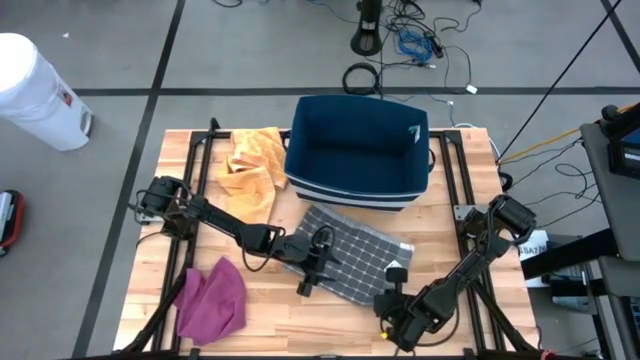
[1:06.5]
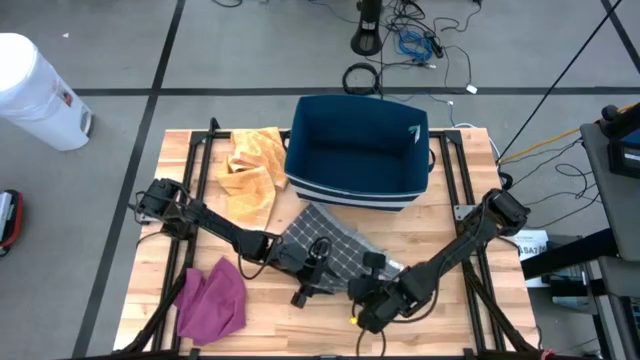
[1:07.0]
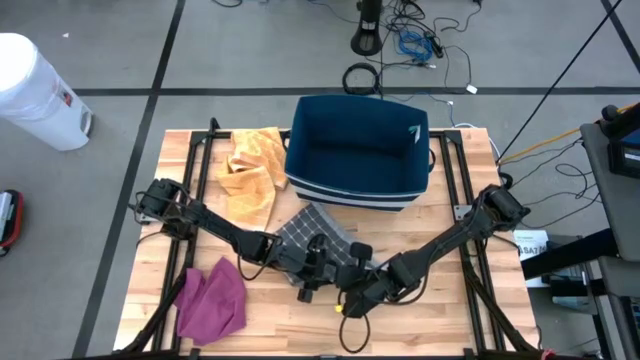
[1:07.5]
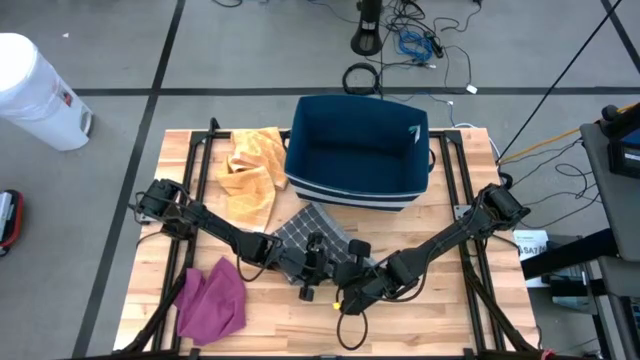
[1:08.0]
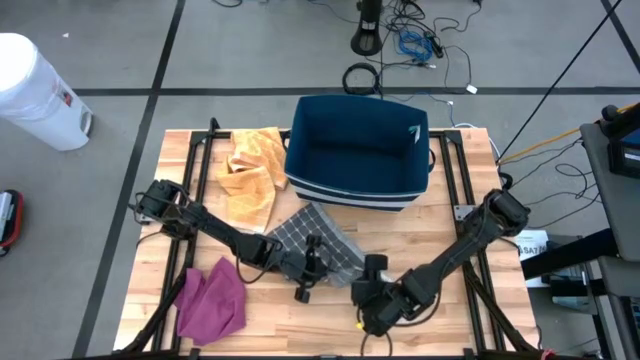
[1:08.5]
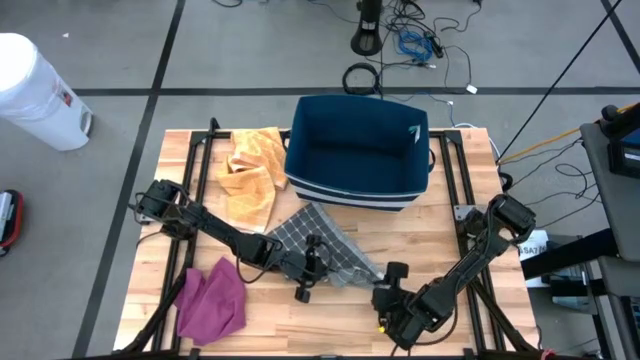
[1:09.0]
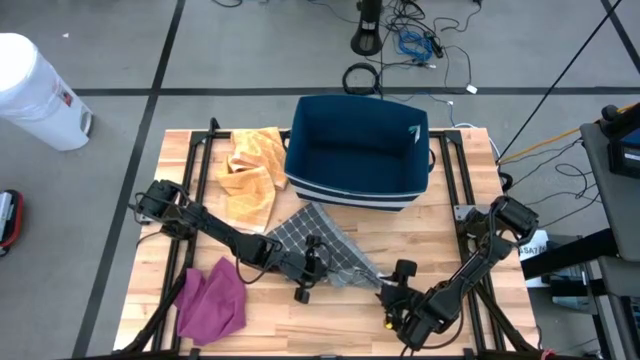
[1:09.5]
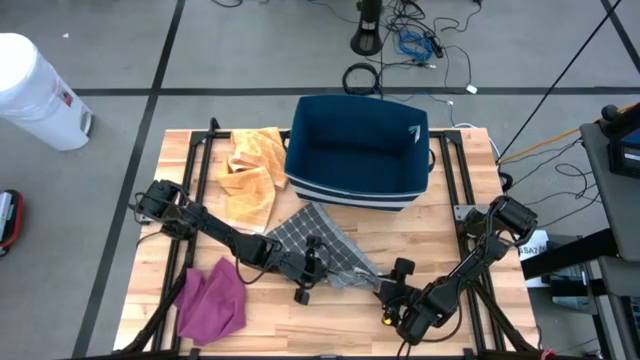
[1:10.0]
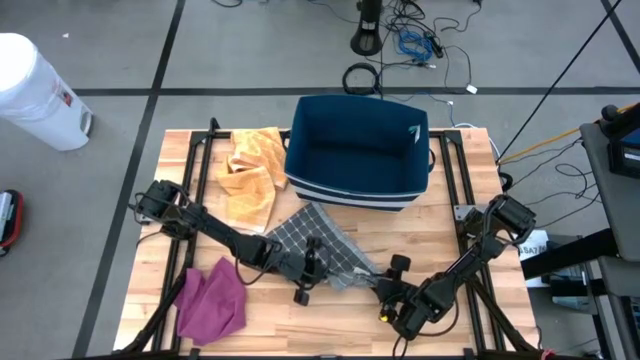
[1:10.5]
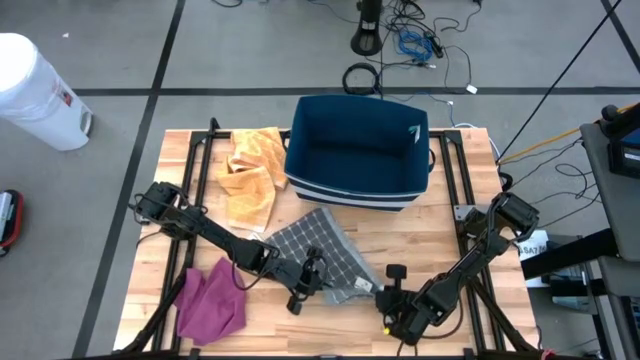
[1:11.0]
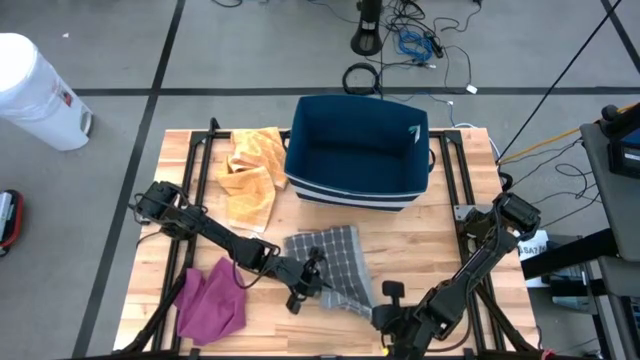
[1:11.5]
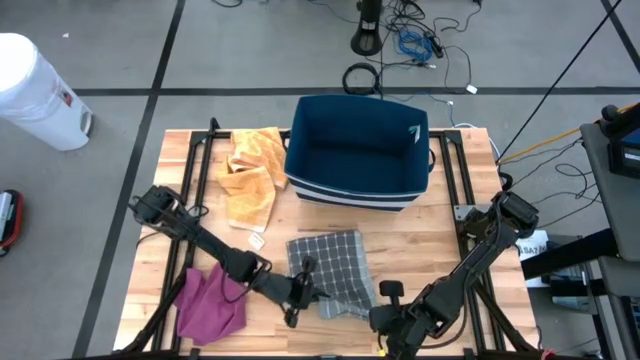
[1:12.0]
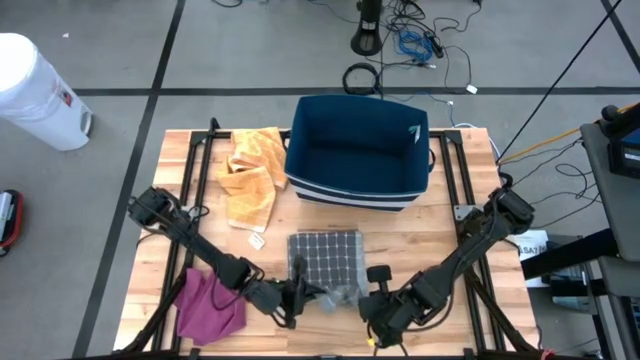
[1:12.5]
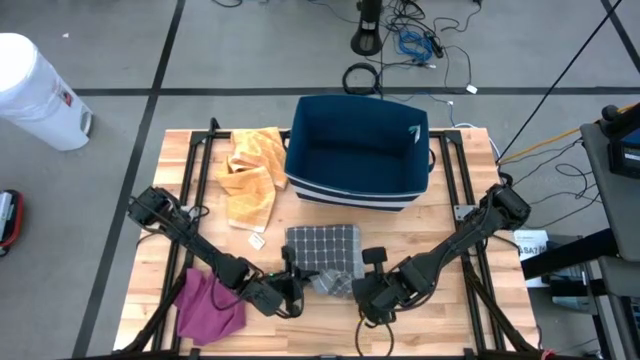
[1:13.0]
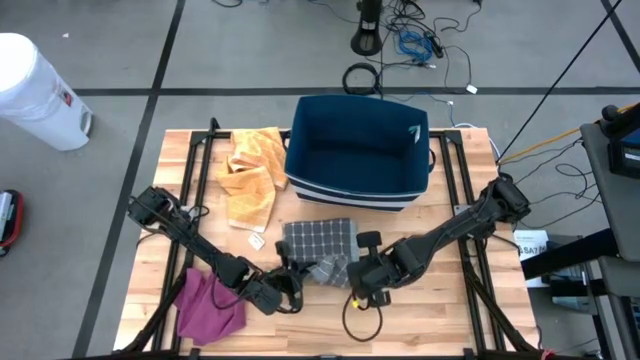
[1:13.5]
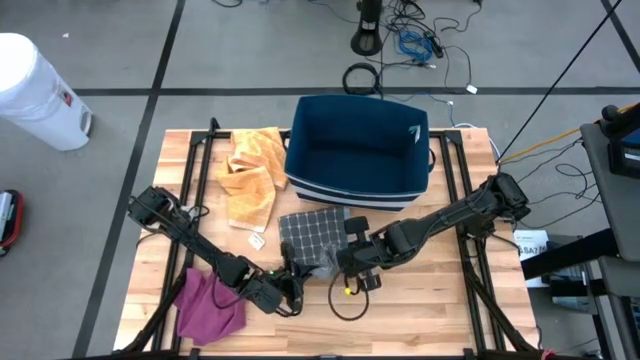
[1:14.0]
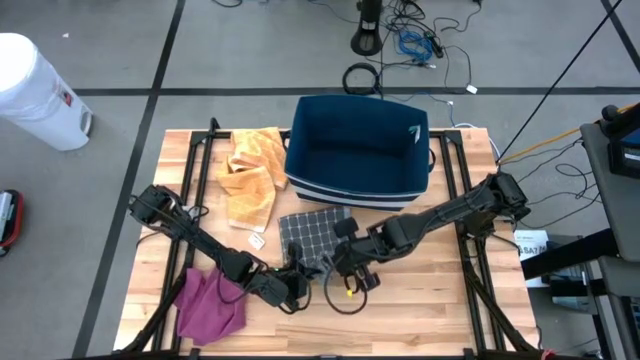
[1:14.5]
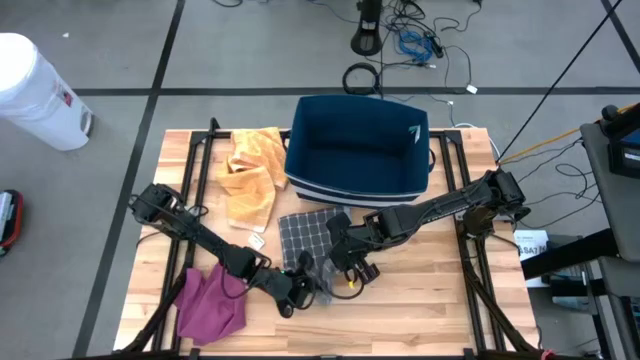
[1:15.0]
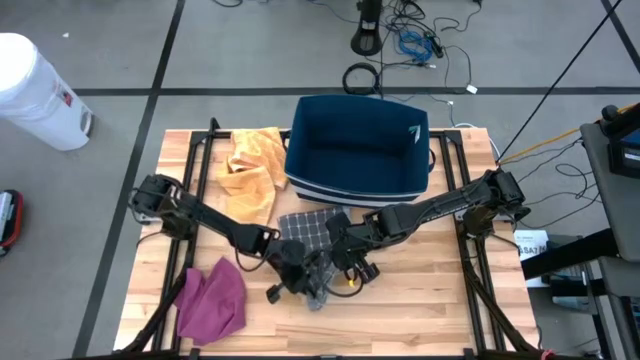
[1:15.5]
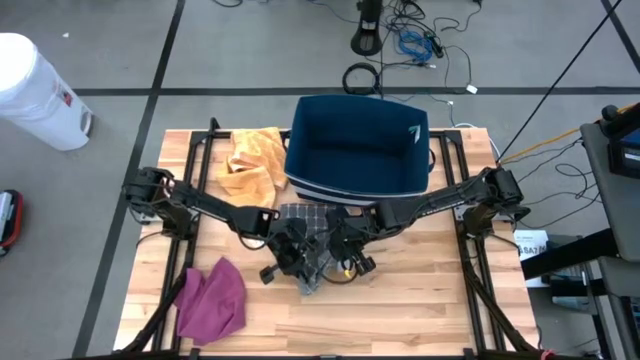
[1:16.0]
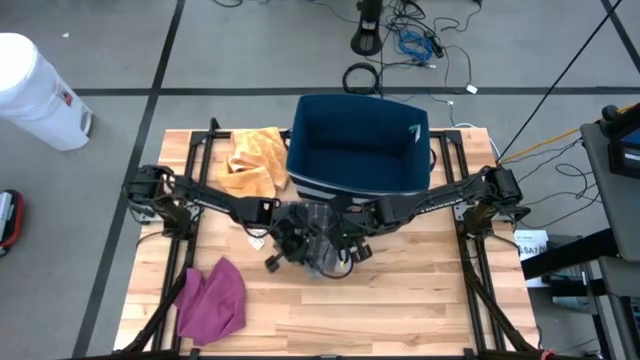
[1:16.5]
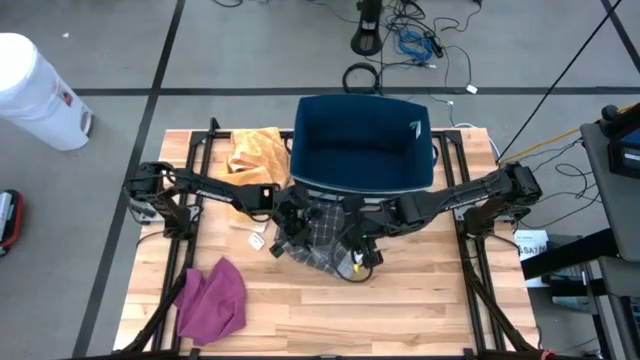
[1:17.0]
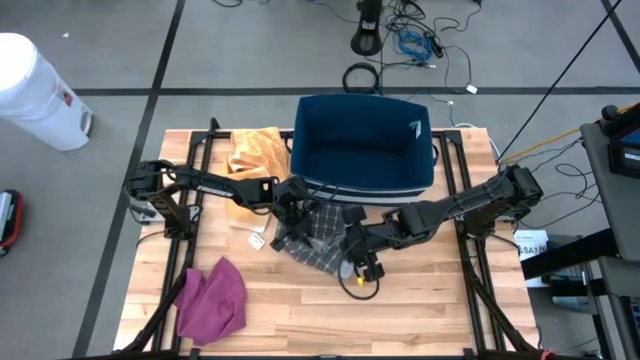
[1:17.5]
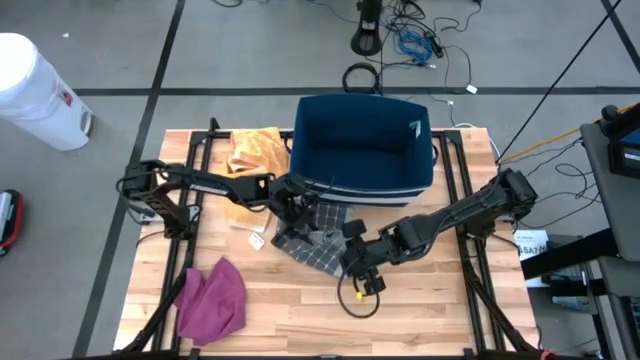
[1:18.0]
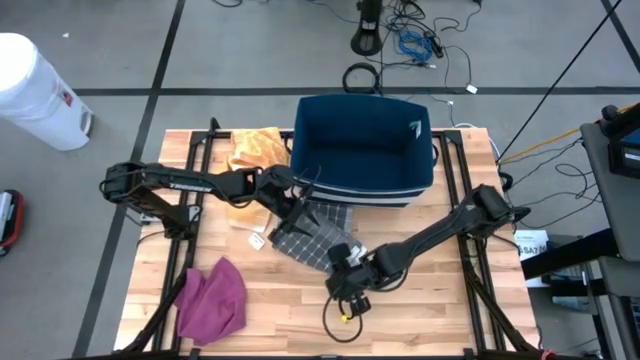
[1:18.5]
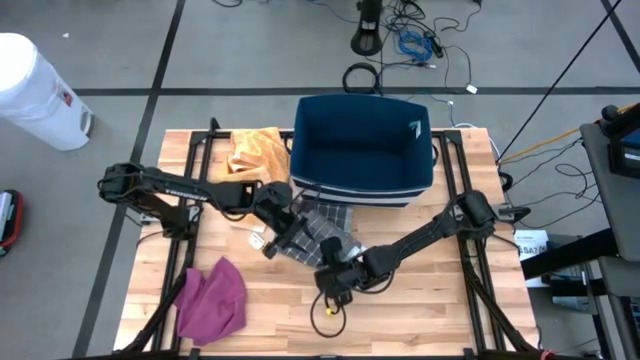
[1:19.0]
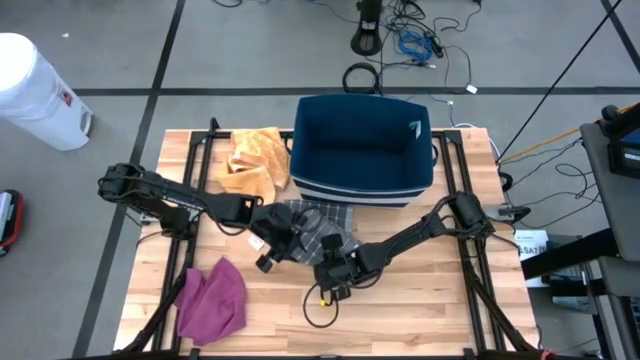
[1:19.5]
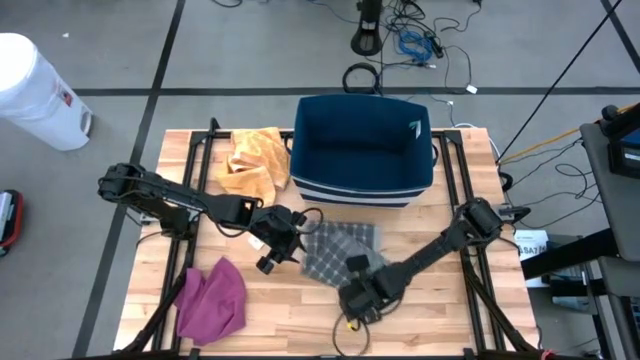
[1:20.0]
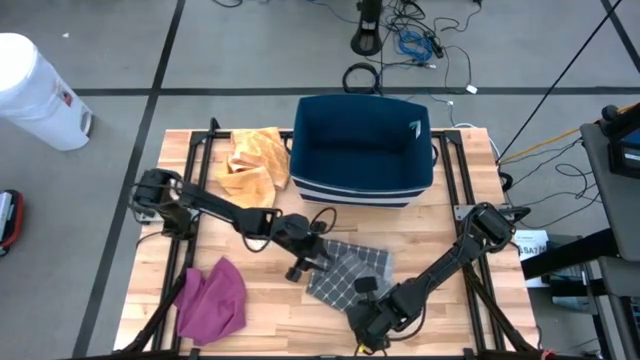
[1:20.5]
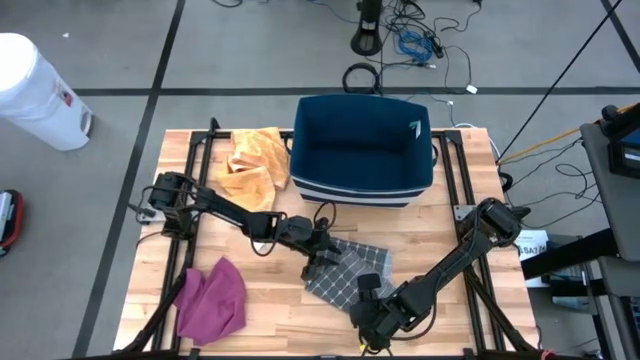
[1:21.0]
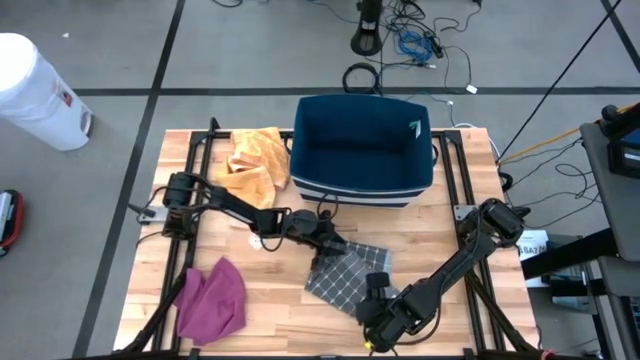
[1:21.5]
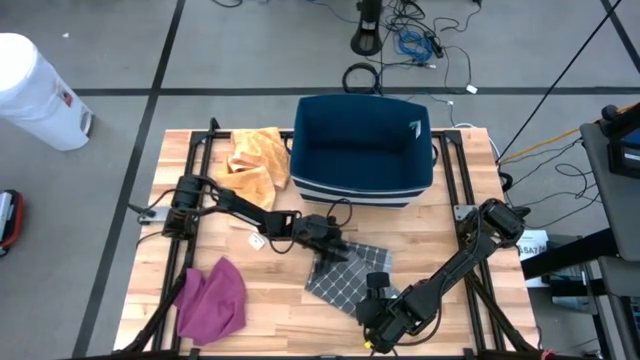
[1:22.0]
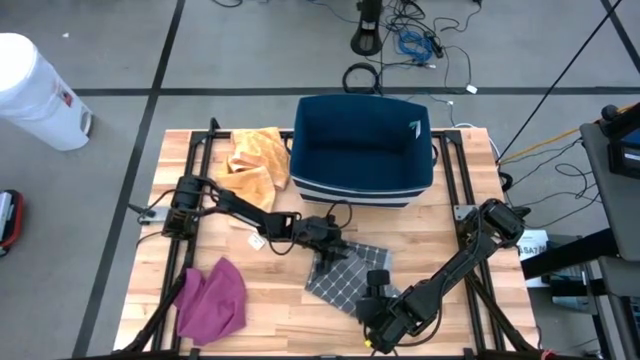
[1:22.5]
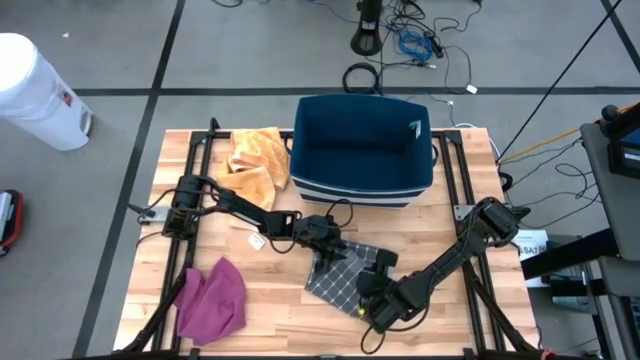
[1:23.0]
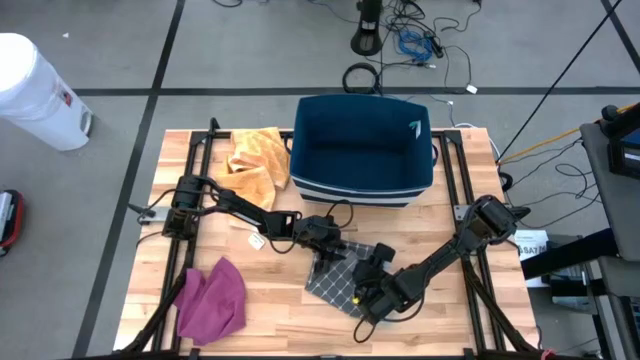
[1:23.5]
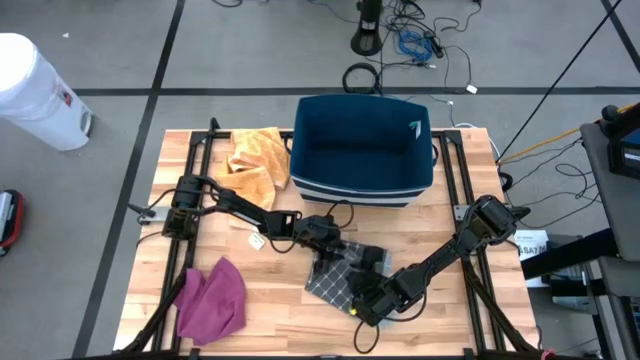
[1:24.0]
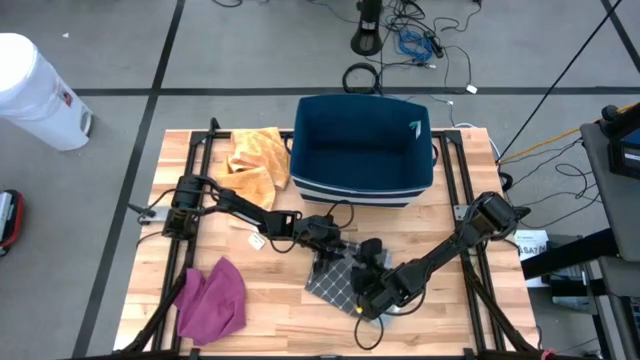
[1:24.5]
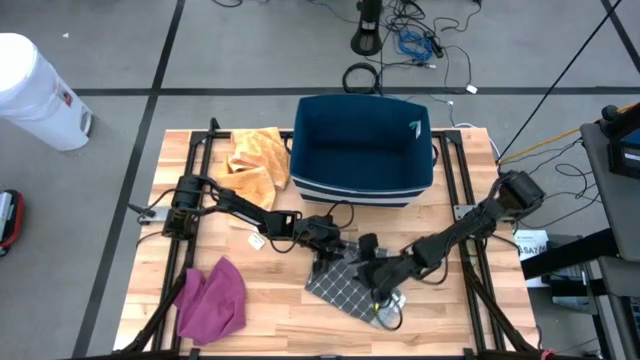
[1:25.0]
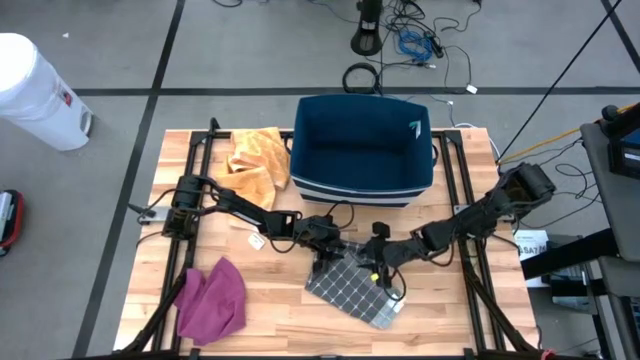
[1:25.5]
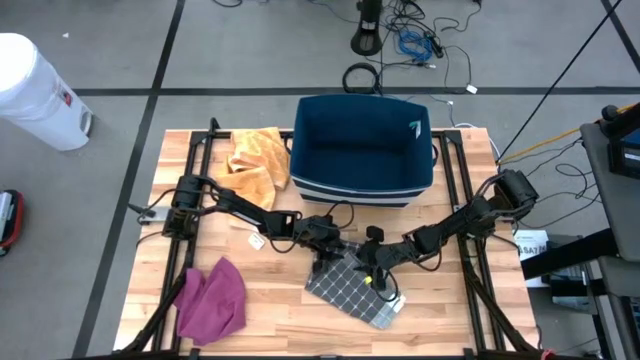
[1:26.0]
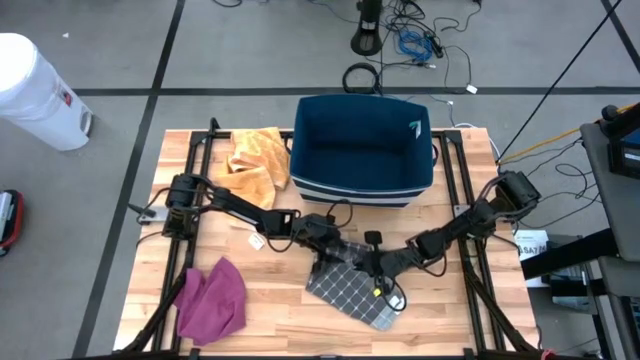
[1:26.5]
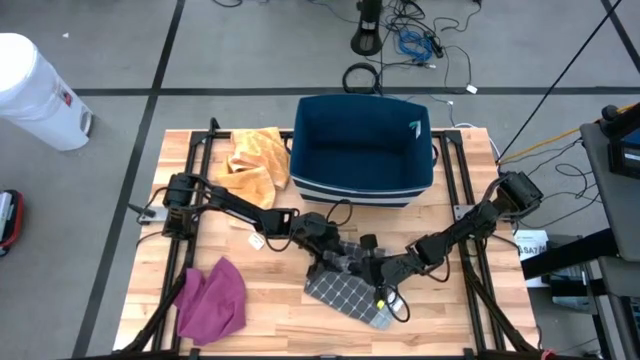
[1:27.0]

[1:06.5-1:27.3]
Task: Fold towel
Fold the gray patterned towel
